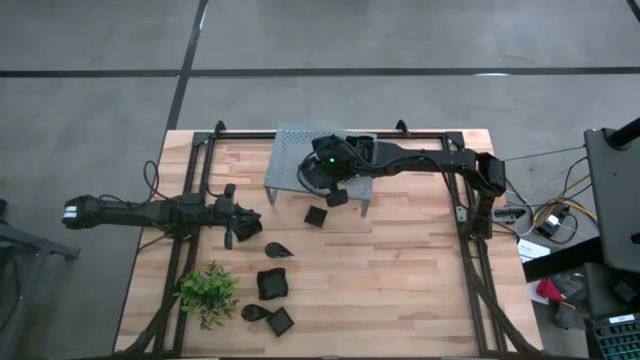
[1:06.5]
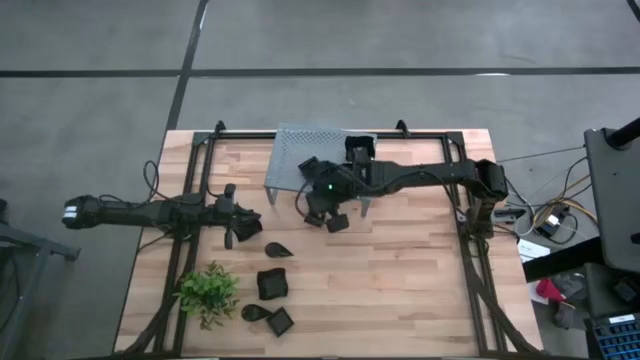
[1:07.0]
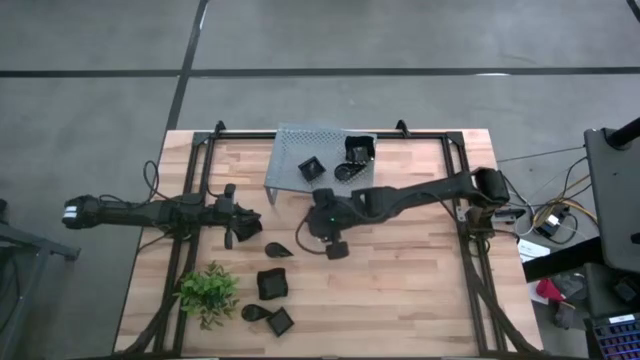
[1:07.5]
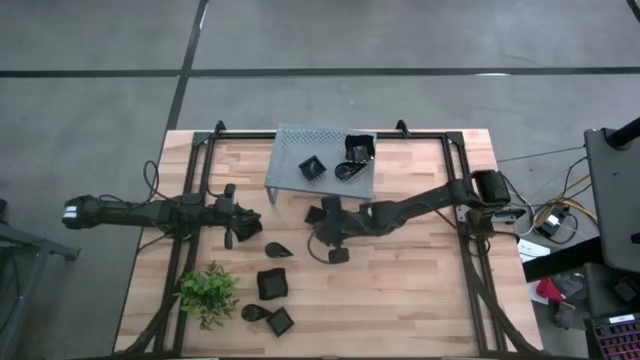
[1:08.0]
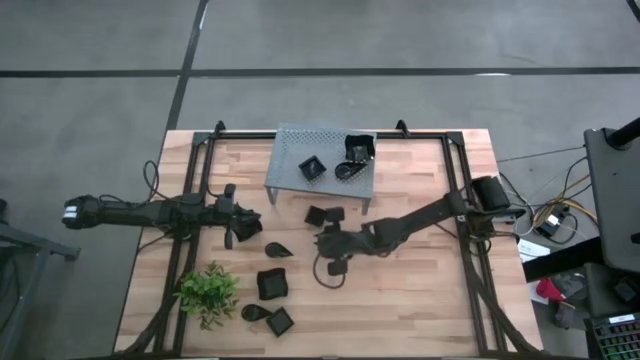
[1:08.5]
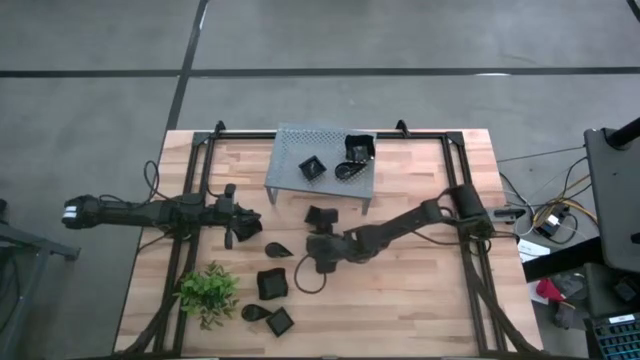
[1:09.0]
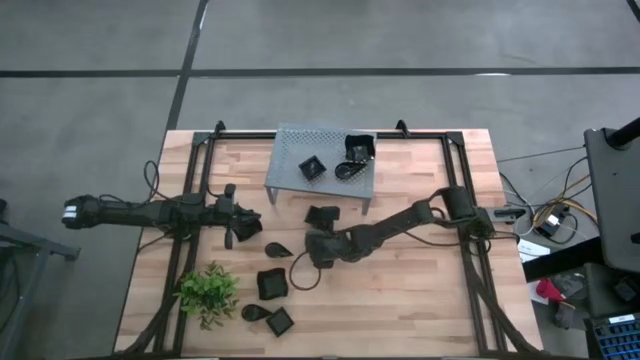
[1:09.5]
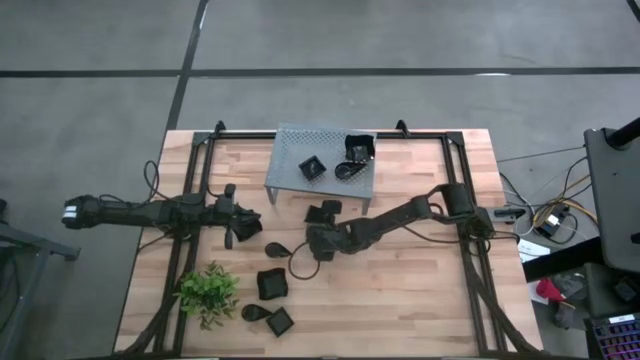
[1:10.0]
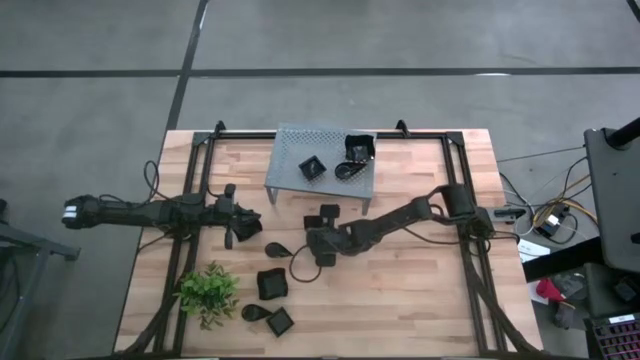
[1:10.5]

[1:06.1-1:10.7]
Task: Pick & Place Mini shaped plates
Stack the black square plate on top of the other black square plate on the shelf

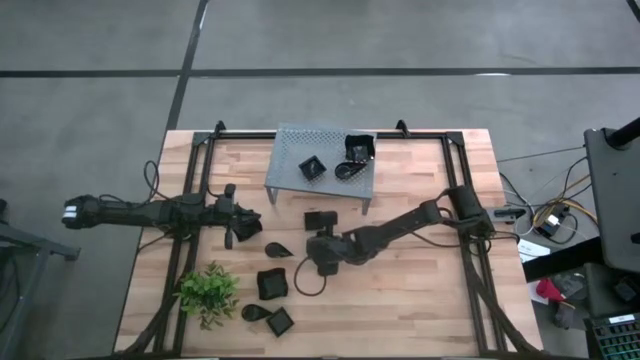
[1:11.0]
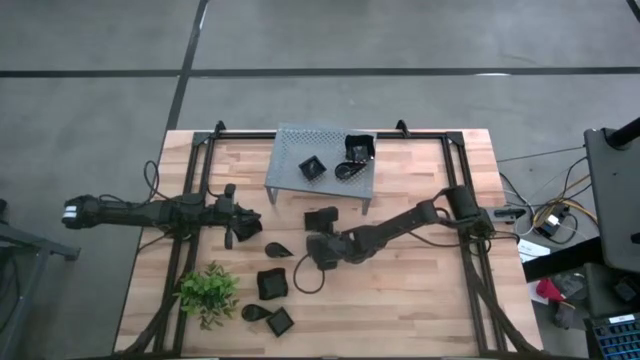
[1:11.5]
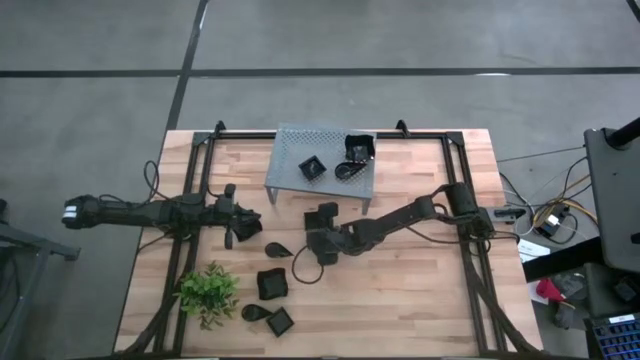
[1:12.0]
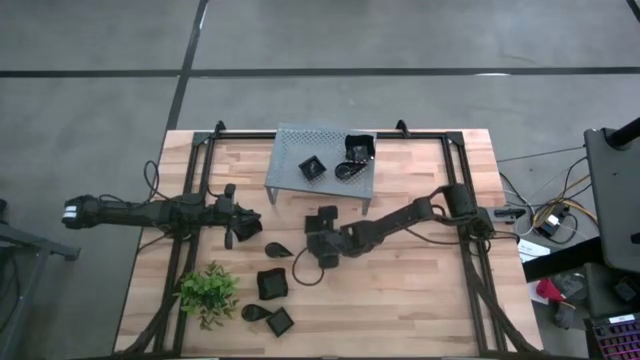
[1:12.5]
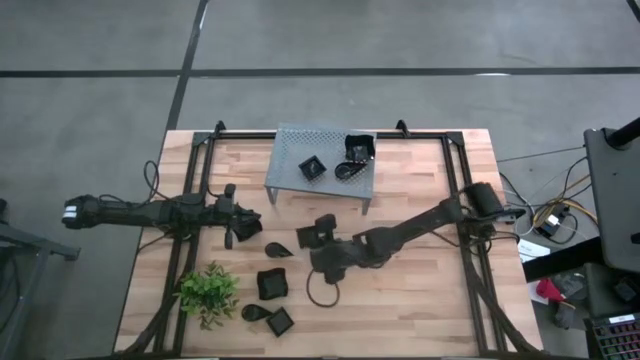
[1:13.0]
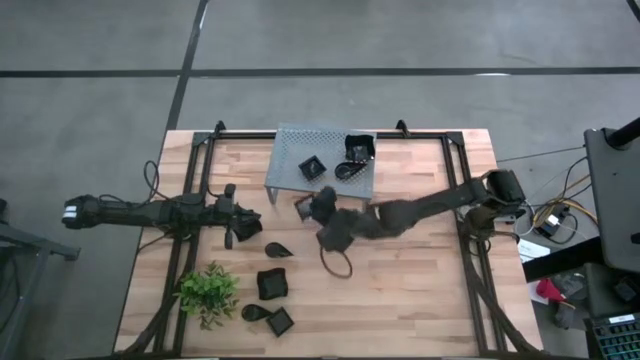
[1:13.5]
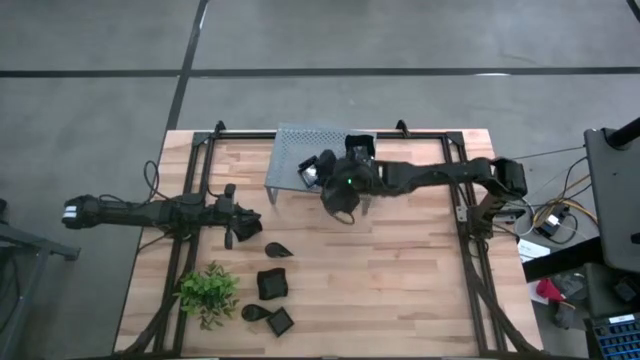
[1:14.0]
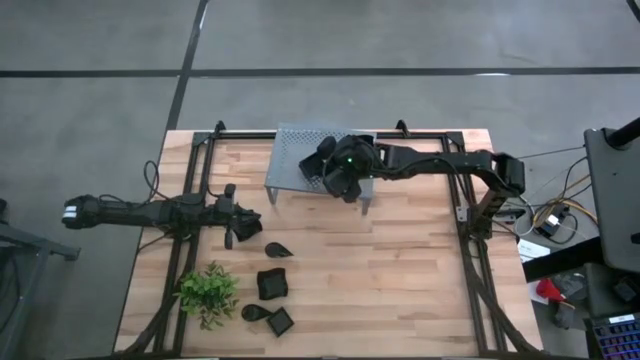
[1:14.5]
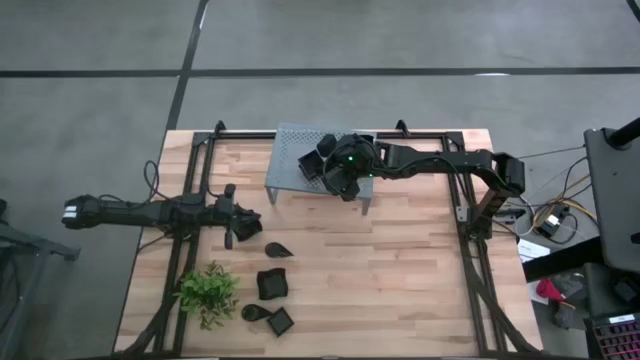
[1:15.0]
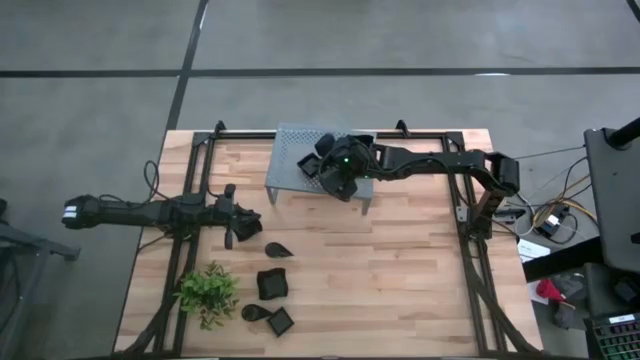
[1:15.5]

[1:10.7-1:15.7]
Stack the black square plate on top of the other black square plate on the shelf

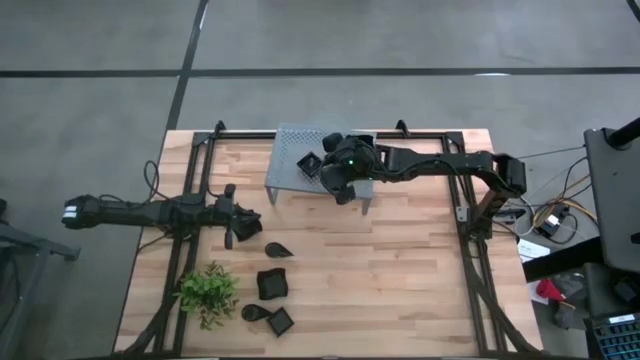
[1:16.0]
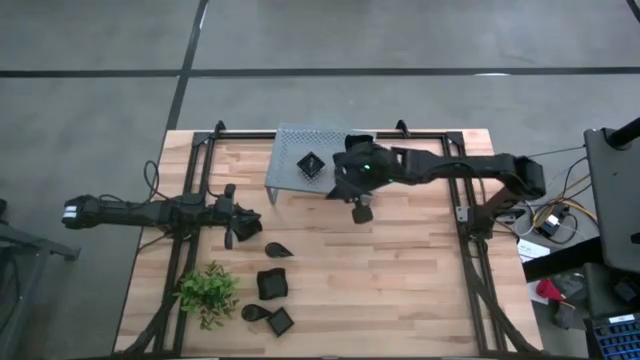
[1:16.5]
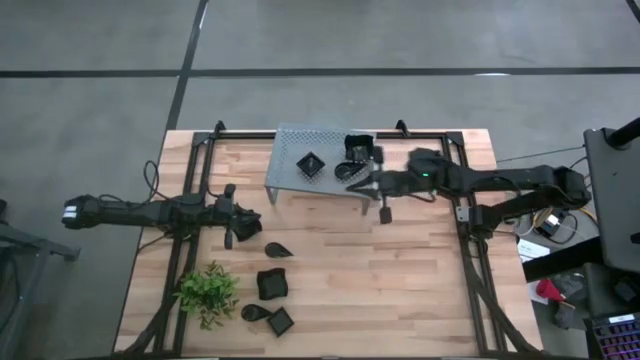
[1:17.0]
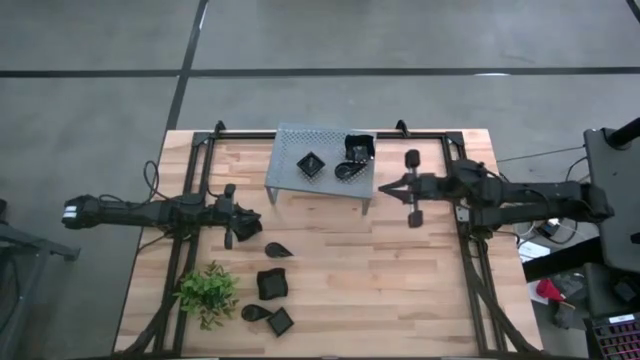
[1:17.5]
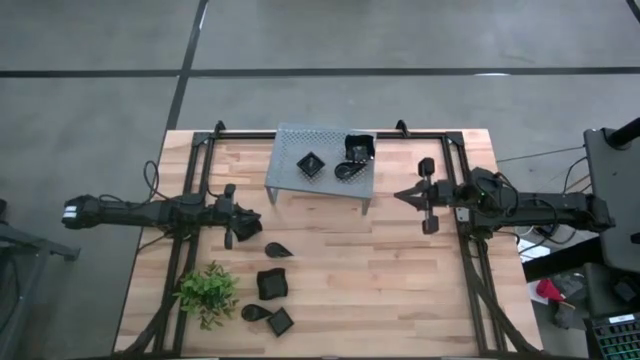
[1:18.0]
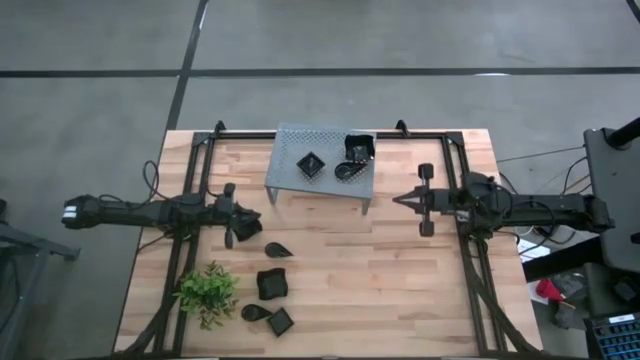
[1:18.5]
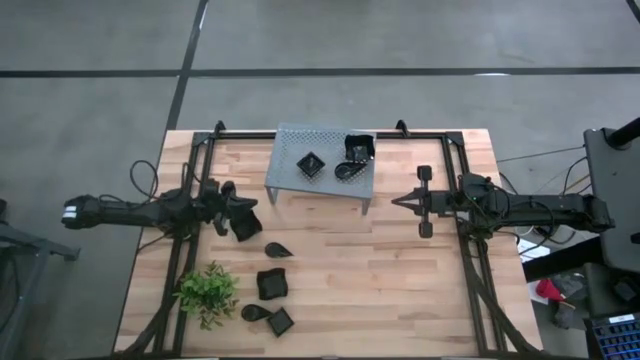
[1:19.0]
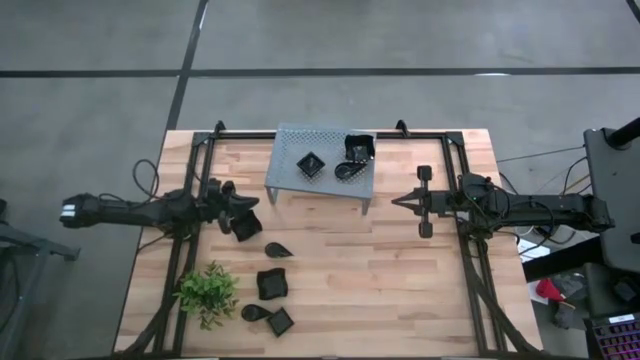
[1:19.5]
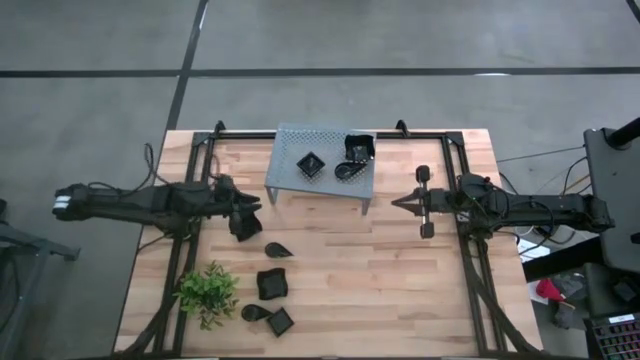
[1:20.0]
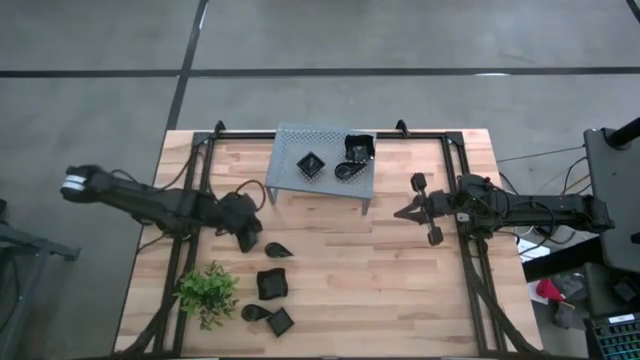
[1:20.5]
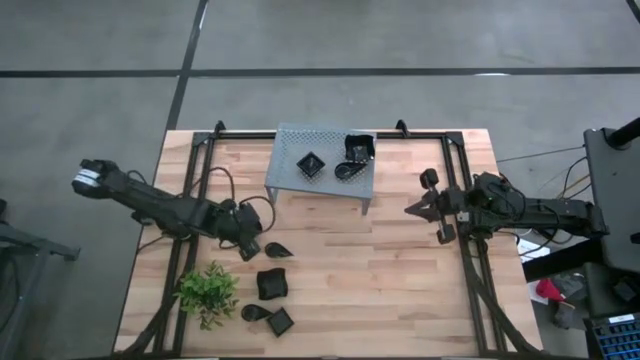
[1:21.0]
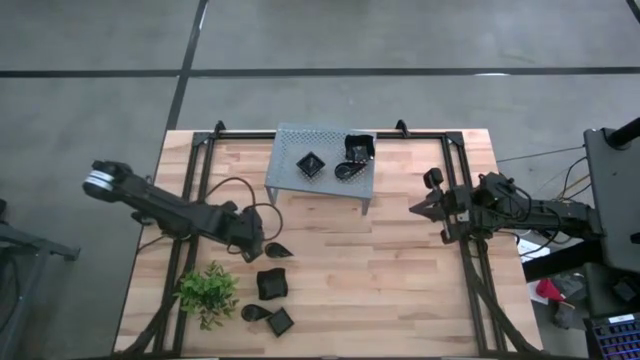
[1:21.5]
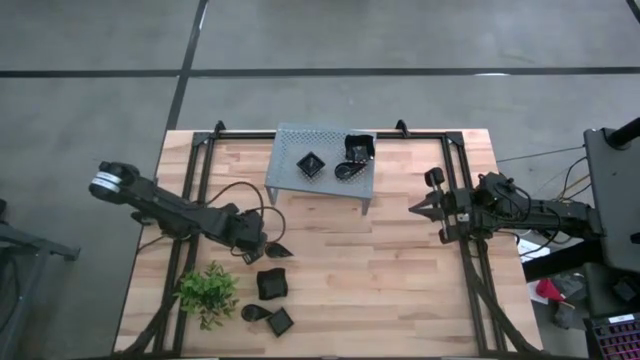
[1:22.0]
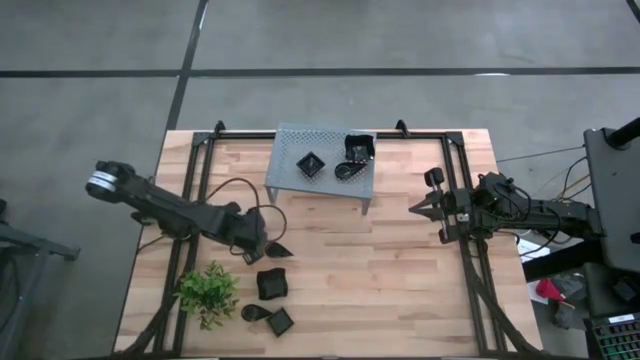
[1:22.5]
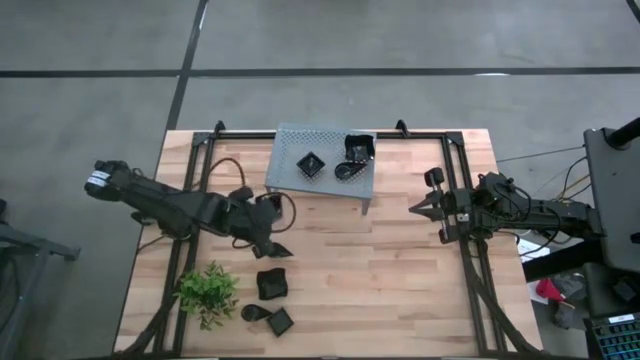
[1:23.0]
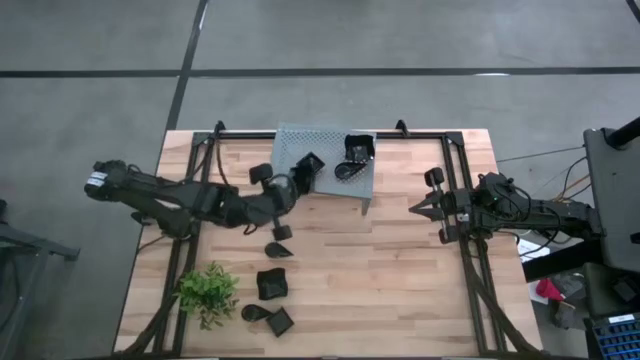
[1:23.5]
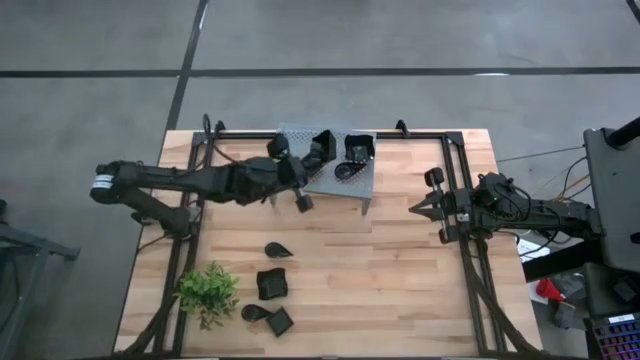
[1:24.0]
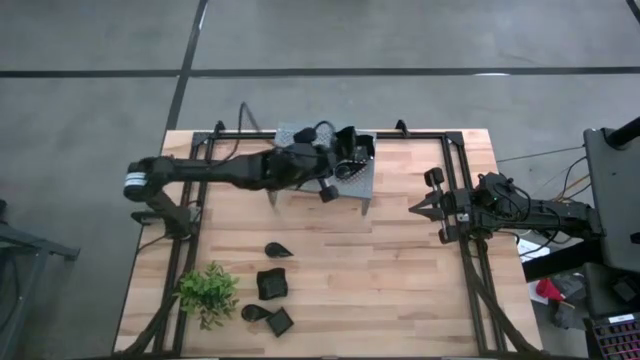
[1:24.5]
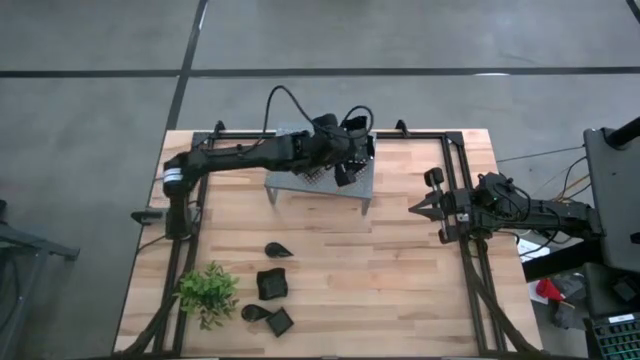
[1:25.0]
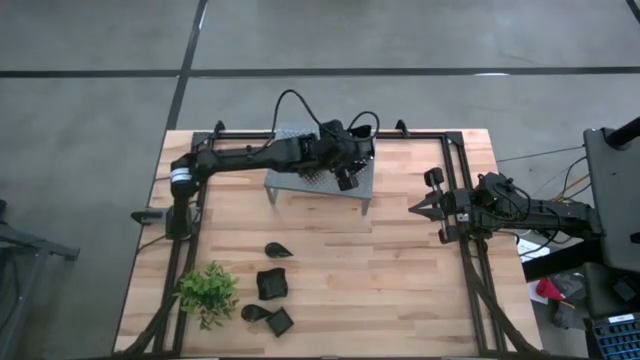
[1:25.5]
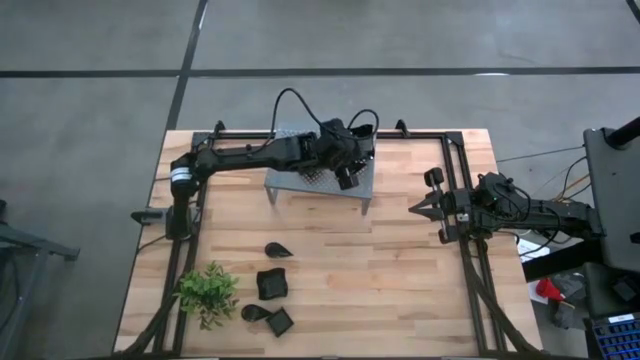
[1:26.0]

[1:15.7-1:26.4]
Stack the black distorted square plate on top of the other black distorted square plate on the shelf

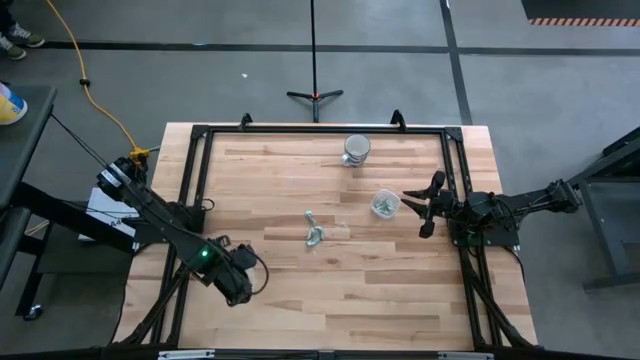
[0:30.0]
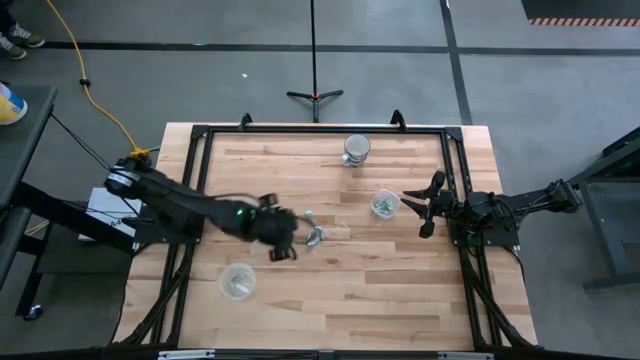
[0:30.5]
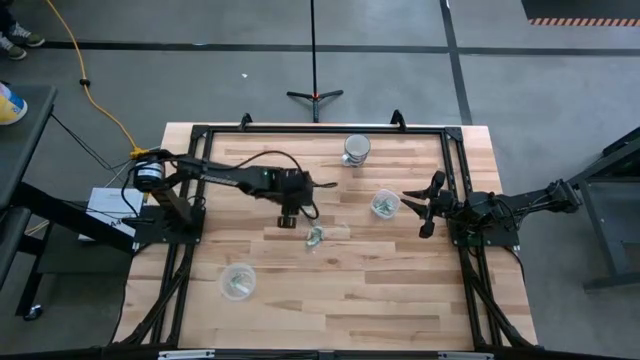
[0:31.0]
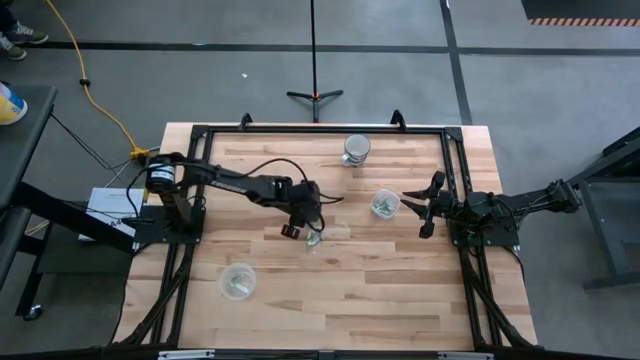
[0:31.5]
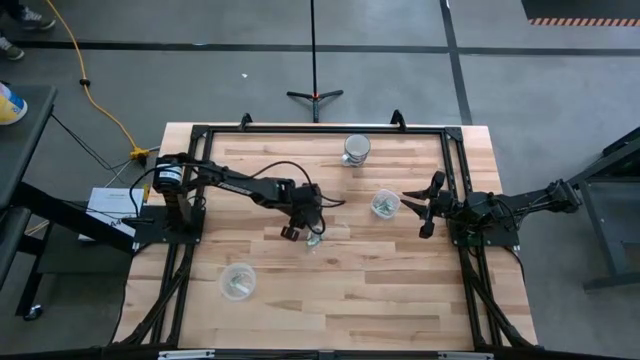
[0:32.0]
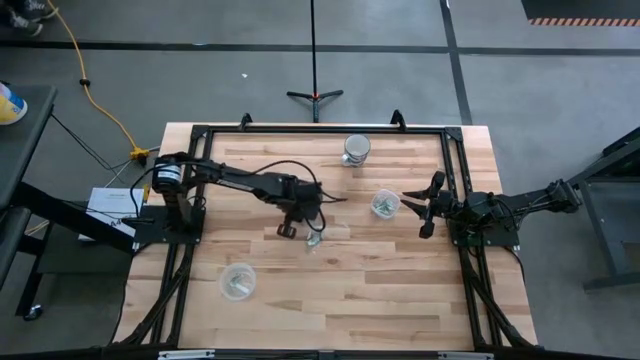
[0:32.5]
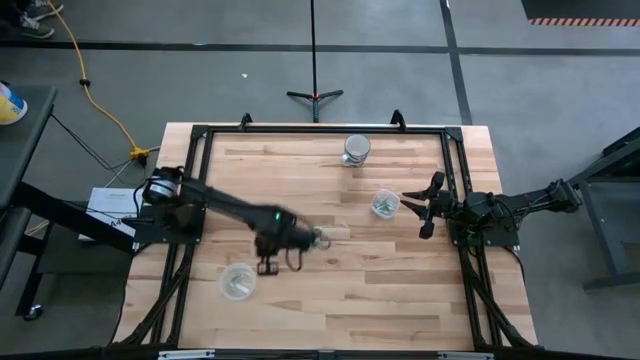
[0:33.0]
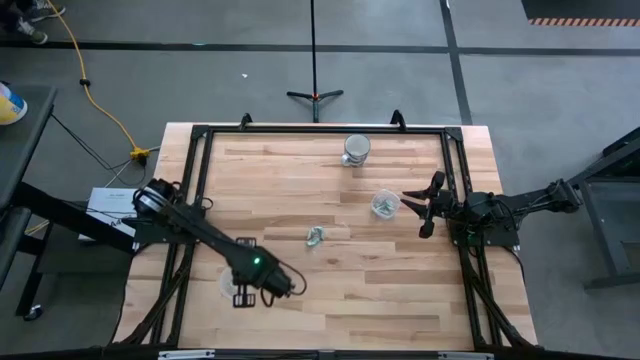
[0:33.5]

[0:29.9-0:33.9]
Task: Pick and place Stevia / Truvia into bins
Put the stevia packet into the round transparent container
